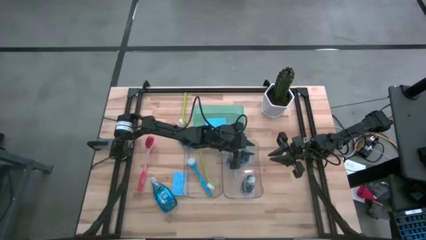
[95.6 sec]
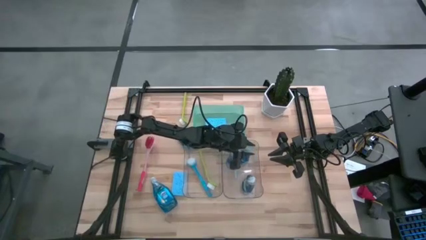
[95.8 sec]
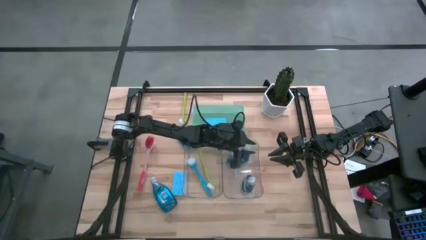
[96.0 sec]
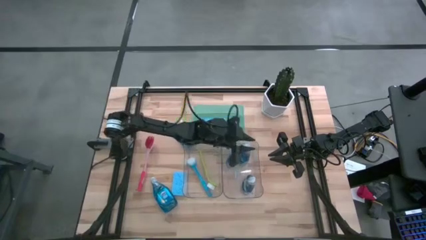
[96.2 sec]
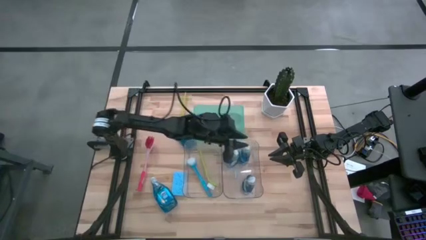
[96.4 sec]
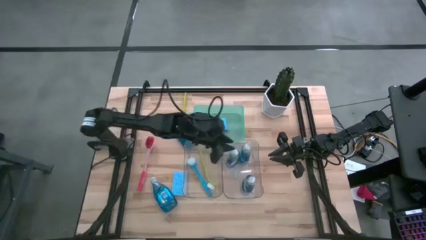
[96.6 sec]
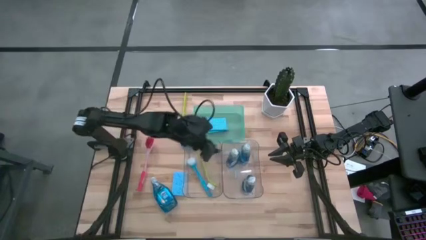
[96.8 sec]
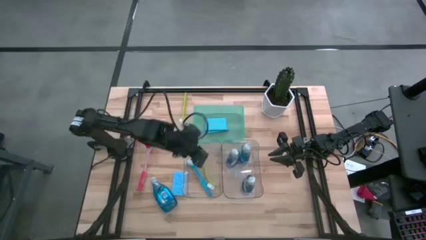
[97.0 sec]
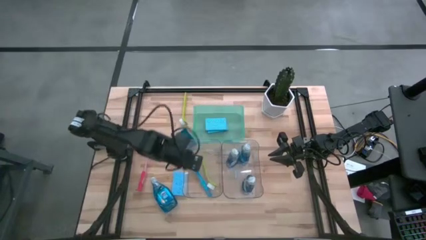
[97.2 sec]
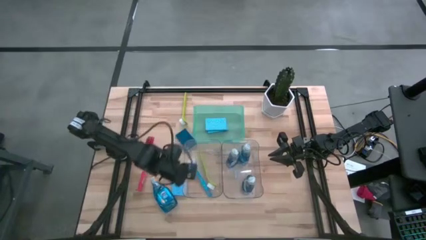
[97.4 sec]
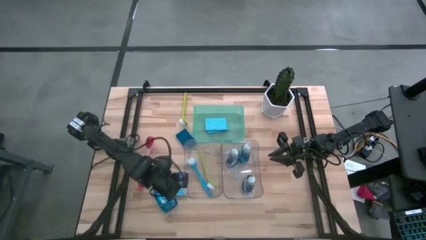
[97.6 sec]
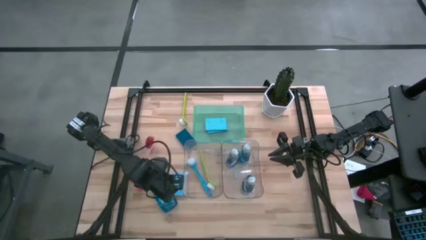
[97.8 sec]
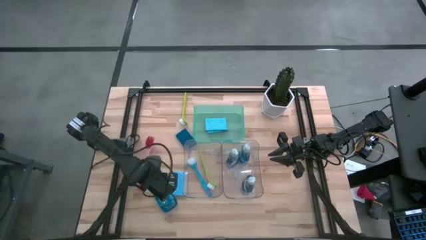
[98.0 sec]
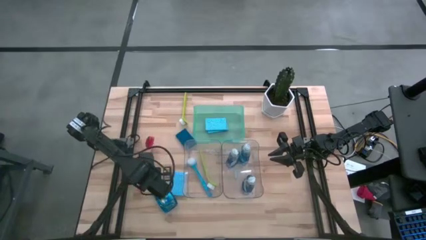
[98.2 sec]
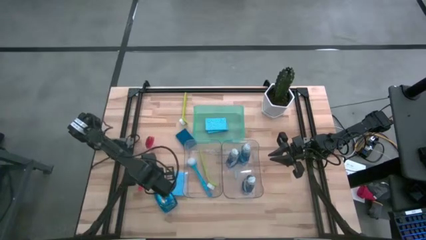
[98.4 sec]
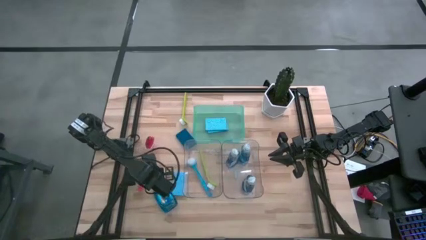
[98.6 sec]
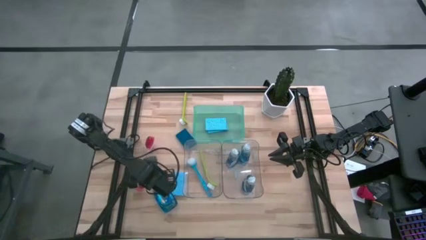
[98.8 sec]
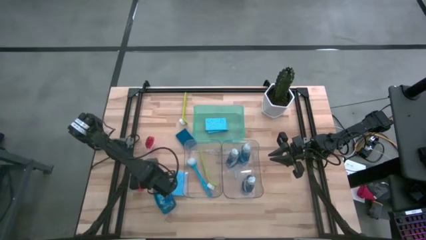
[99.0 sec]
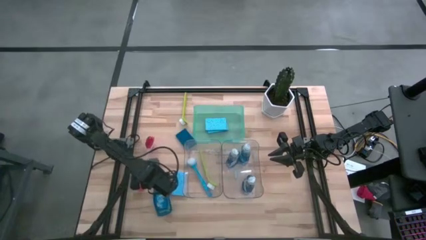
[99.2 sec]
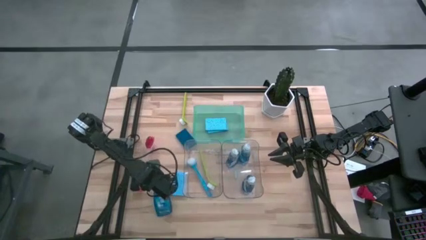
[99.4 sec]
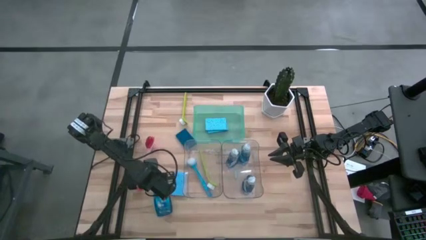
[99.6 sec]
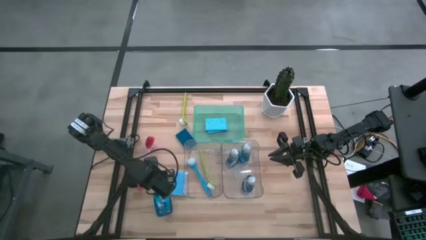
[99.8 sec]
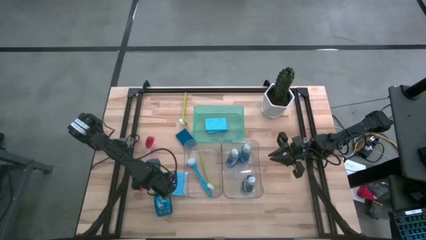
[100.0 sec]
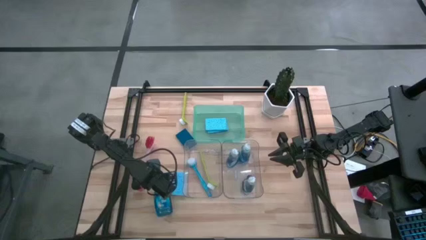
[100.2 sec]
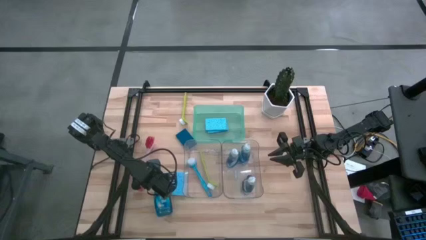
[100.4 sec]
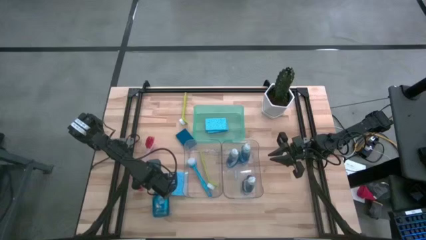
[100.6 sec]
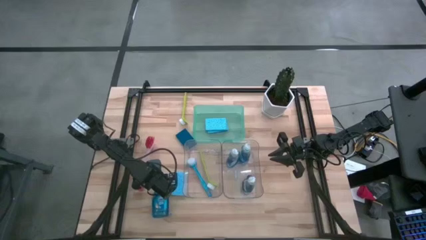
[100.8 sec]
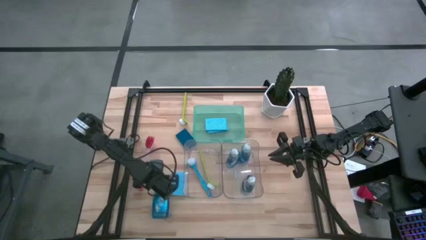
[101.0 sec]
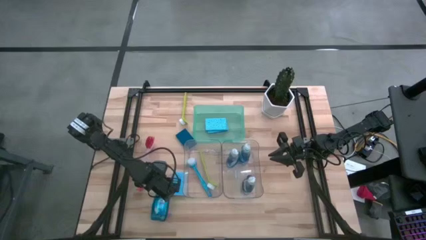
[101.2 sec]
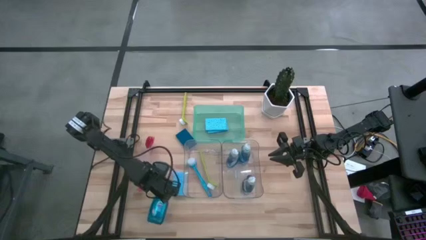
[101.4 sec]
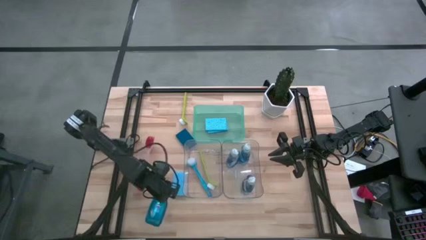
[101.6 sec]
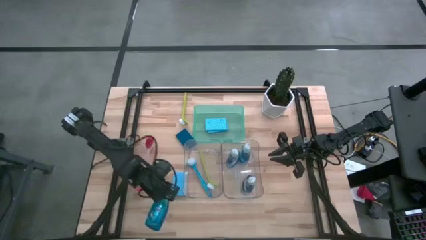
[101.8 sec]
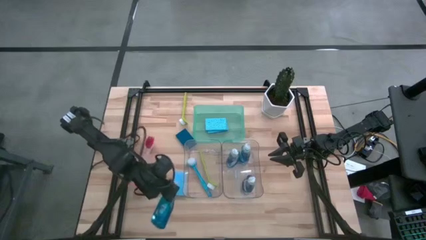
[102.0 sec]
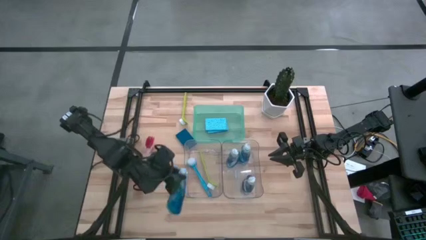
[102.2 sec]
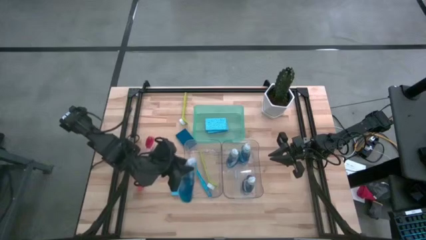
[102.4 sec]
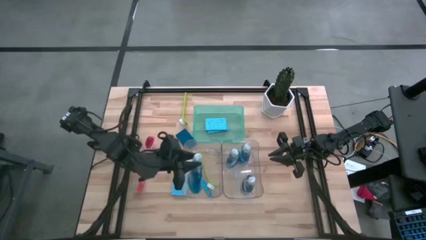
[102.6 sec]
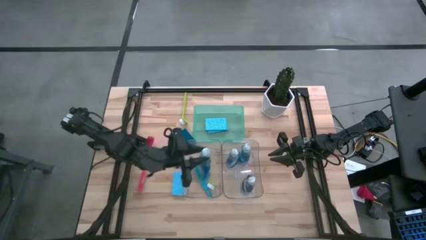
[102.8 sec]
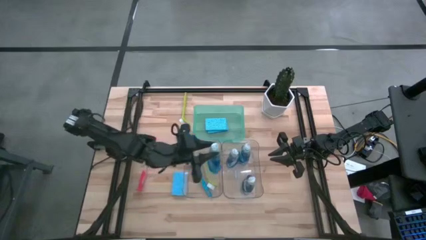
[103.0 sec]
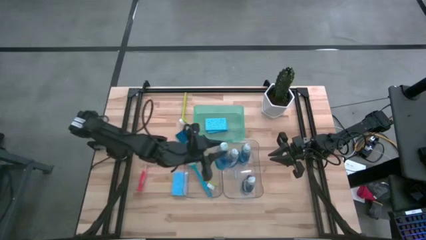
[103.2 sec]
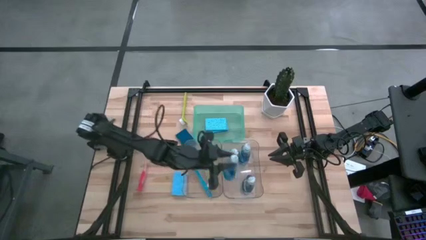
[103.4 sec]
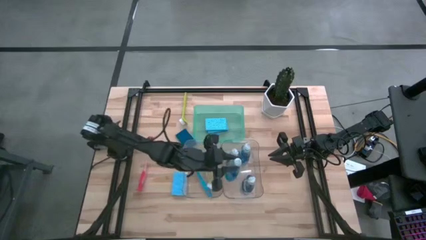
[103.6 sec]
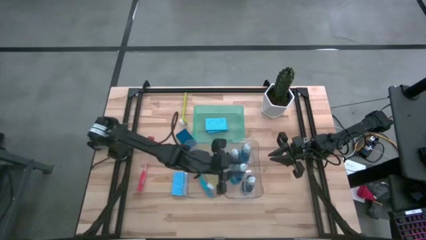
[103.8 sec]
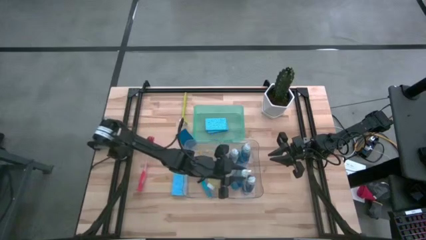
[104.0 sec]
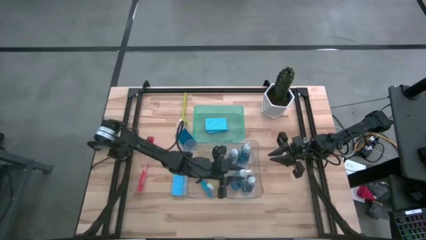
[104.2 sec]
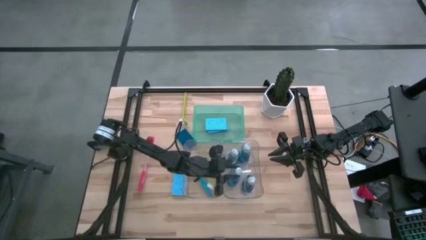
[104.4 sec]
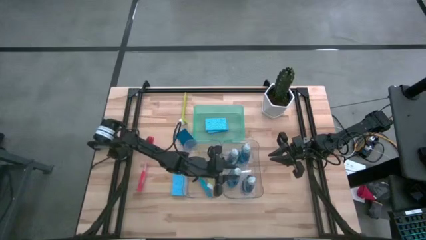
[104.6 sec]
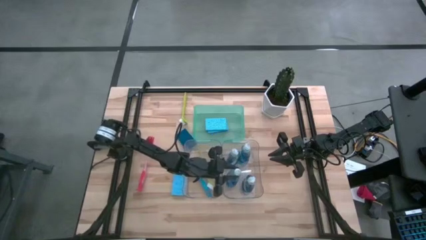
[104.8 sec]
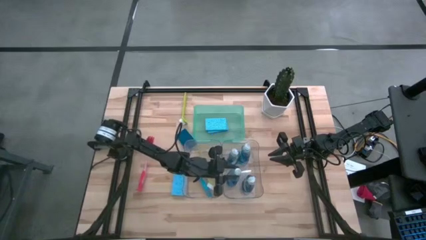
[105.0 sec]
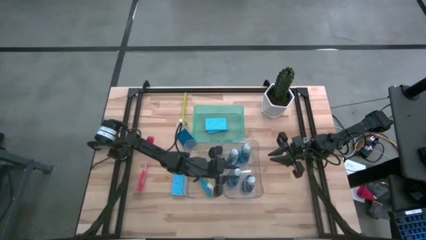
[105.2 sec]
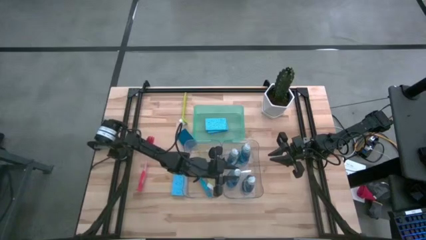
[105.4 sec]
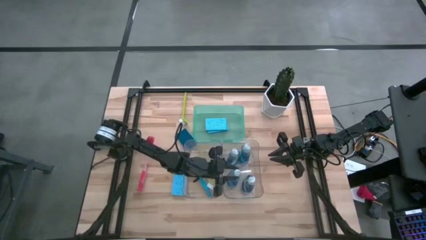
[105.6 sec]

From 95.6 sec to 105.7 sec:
Task: Pick & Place Kitchen Sink Supplies
Put the blue dishwashing liquid bottle into the right transparent bin

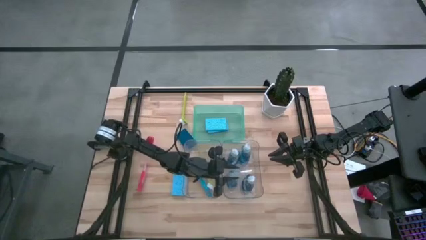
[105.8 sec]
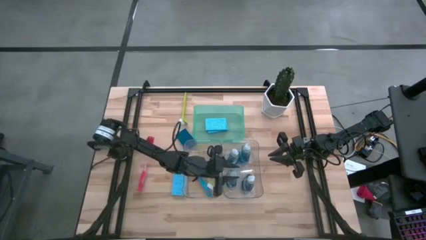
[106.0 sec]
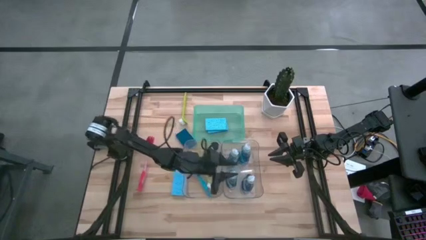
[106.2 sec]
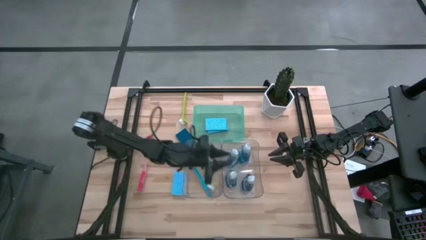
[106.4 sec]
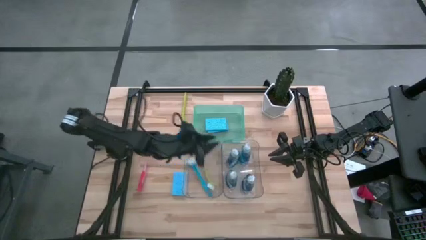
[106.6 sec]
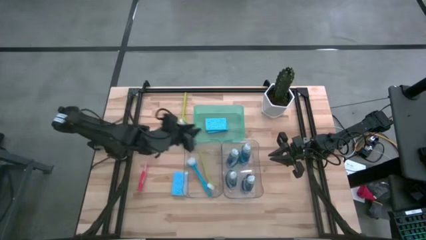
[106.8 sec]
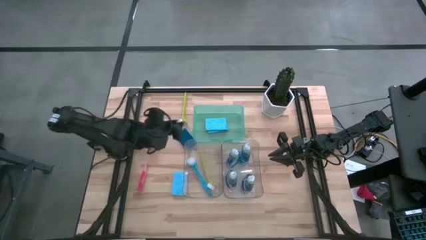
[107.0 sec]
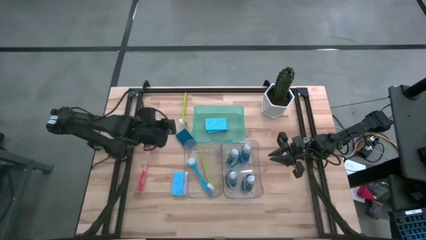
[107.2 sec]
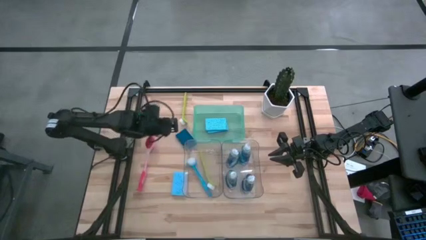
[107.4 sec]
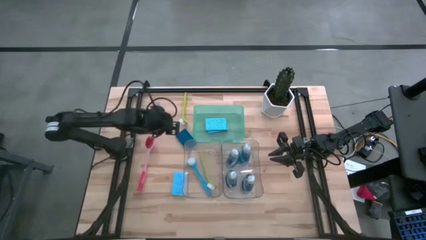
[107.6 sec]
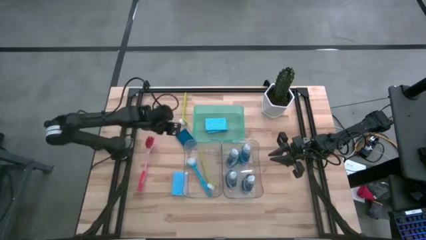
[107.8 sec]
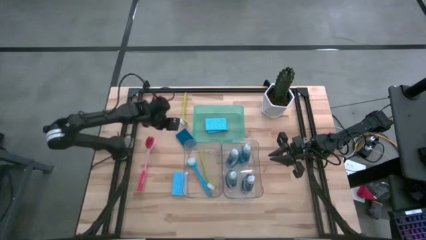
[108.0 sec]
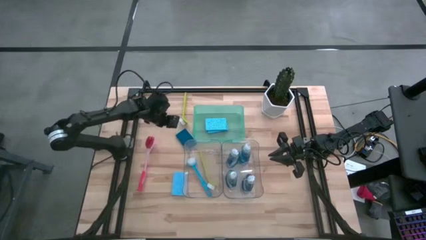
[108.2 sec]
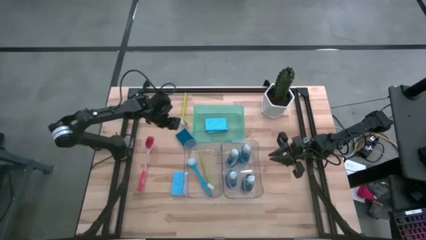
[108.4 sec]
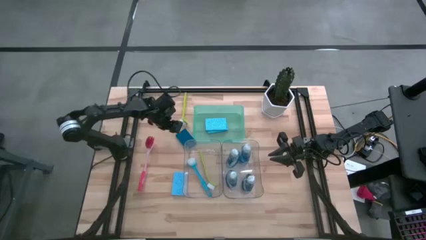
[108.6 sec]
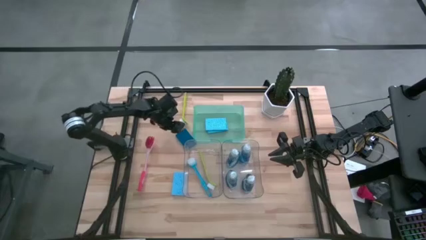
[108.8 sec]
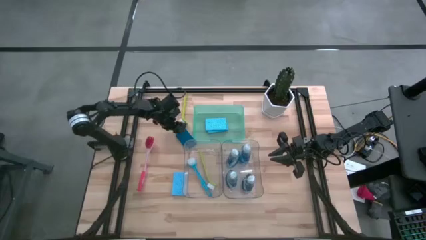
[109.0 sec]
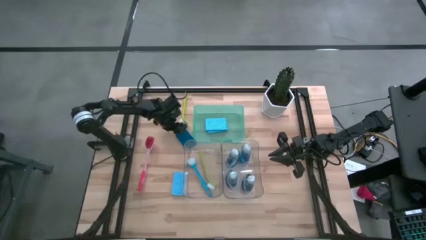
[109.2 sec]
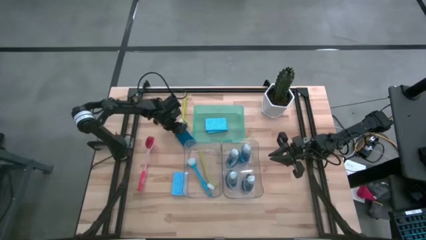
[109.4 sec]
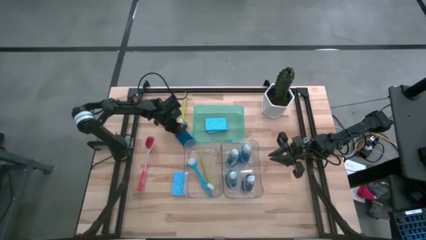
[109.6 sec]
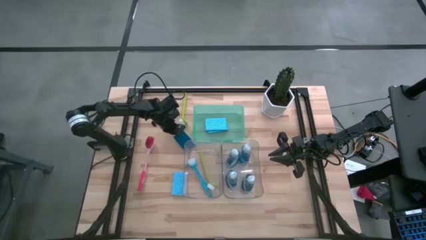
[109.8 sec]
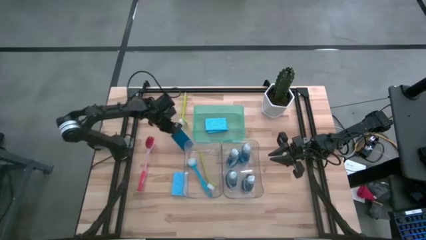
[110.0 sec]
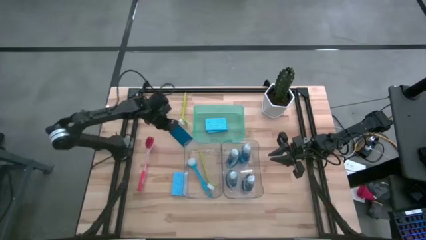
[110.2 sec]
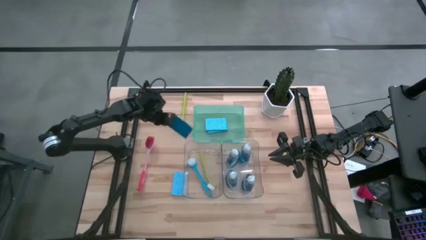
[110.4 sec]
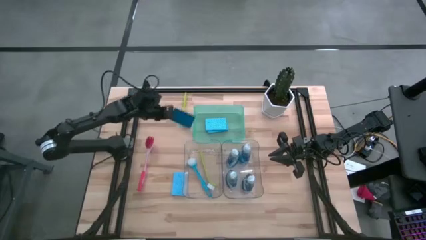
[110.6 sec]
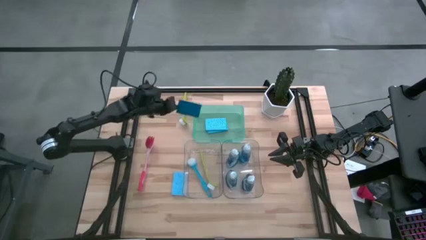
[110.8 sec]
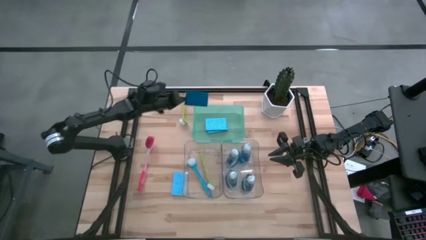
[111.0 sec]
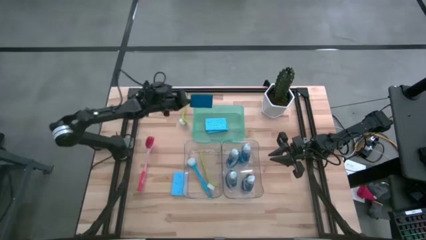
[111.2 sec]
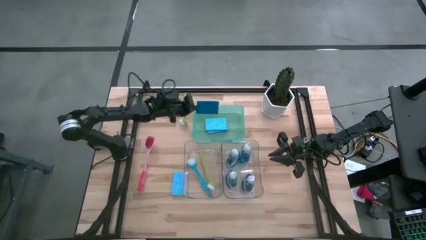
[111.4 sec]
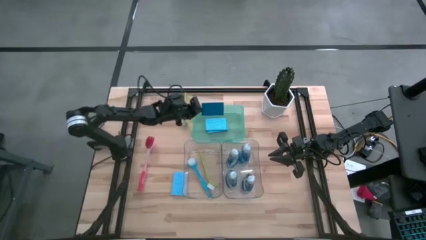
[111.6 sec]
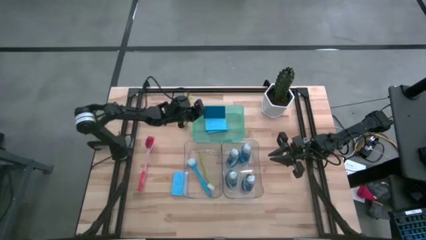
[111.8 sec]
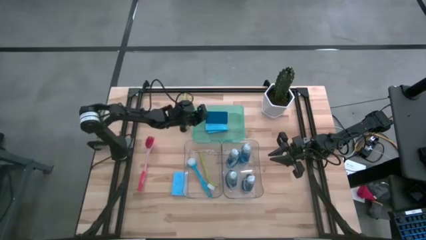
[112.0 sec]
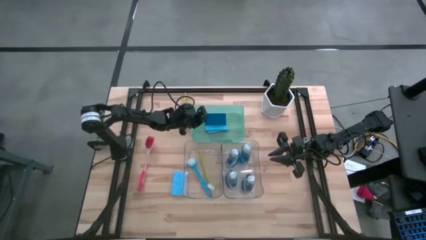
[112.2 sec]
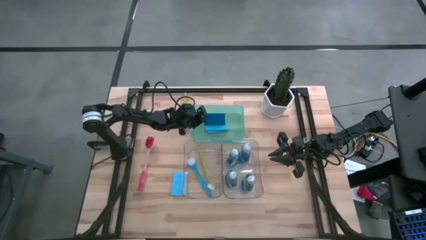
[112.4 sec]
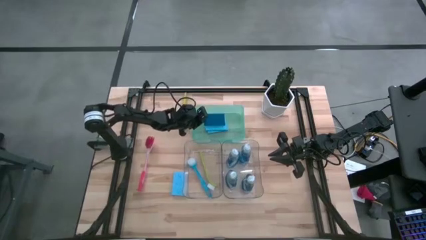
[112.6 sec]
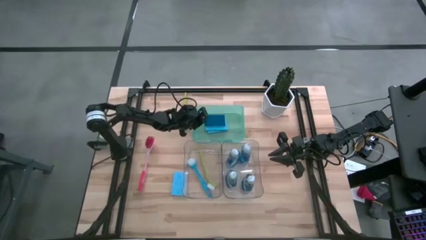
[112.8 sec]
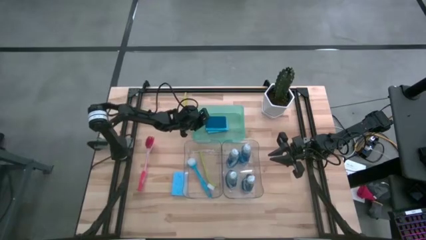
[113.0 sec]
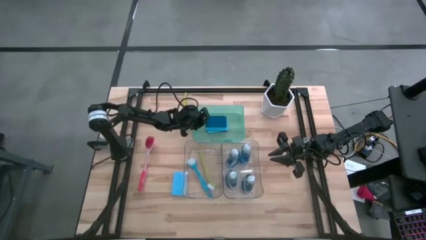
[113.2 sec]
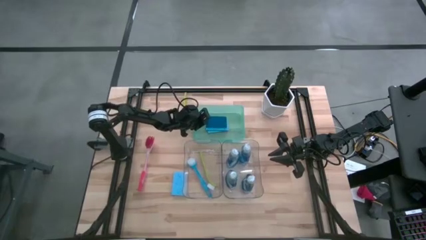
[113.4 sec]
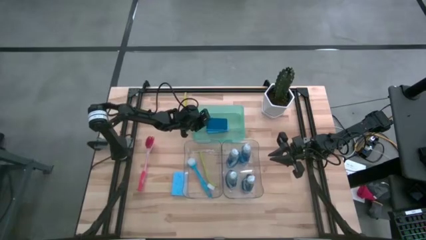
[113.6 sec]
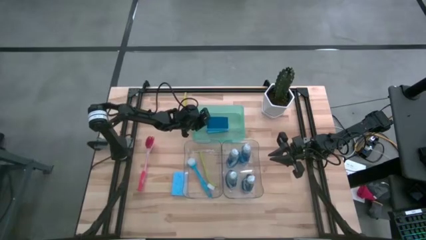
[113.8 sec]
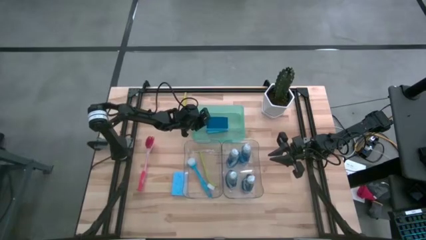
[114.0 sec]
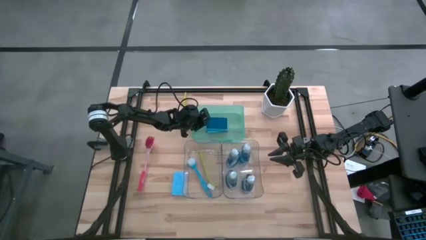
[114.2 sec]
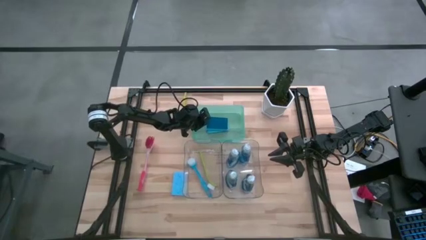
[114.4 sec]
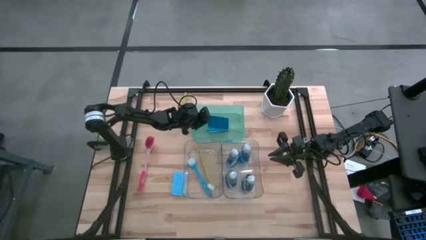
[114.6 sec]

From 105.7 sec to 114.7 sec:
Put the blue sponge into the green bin
